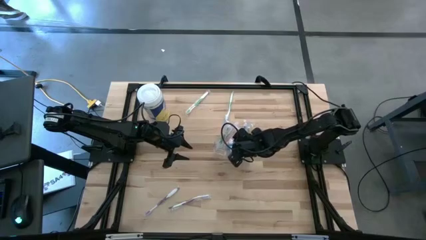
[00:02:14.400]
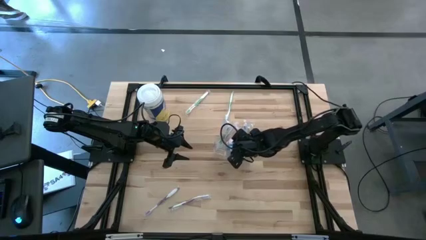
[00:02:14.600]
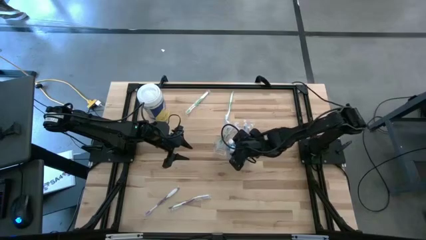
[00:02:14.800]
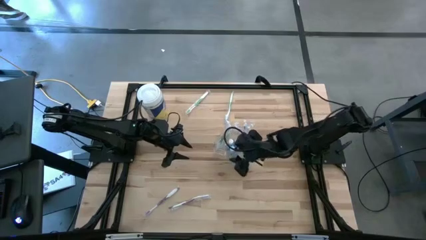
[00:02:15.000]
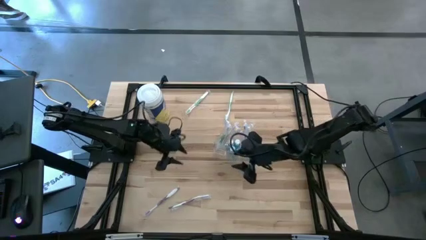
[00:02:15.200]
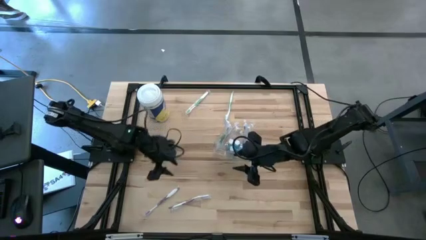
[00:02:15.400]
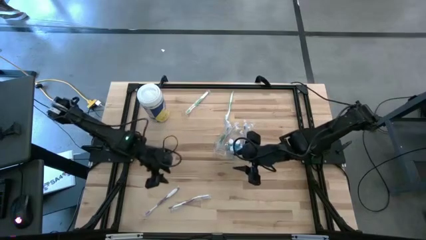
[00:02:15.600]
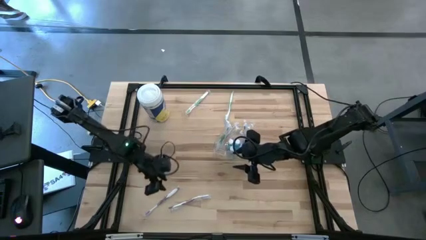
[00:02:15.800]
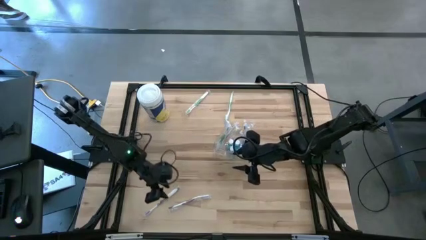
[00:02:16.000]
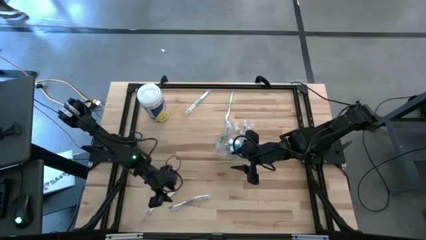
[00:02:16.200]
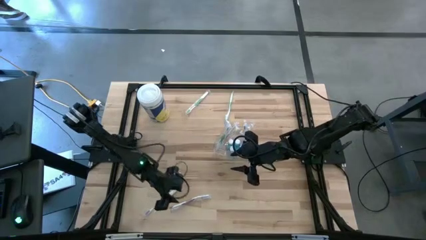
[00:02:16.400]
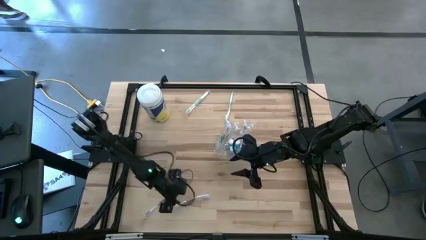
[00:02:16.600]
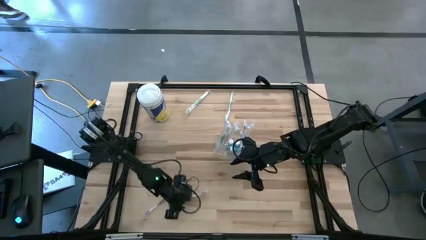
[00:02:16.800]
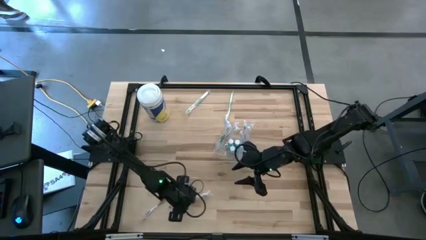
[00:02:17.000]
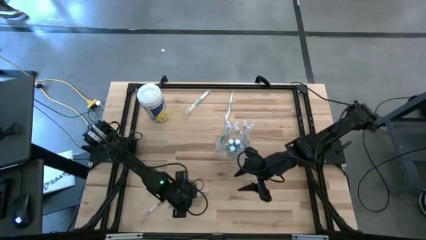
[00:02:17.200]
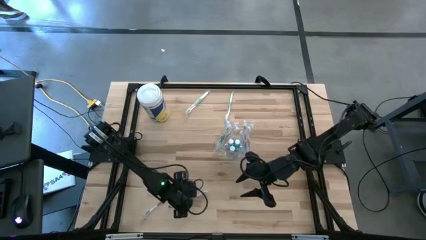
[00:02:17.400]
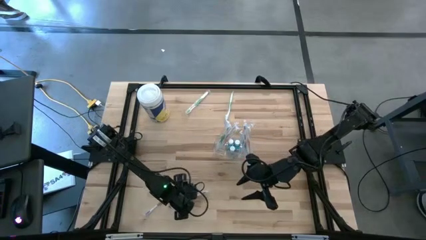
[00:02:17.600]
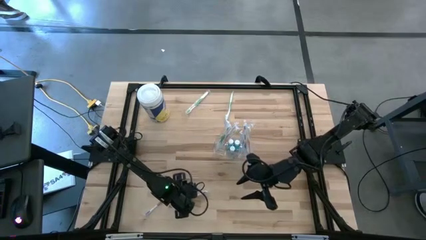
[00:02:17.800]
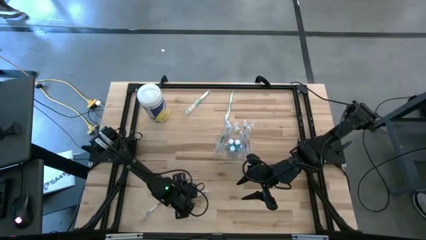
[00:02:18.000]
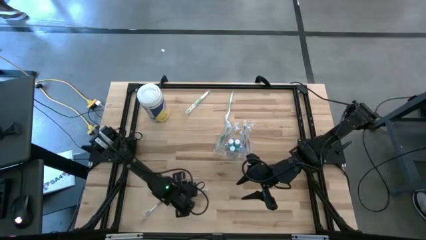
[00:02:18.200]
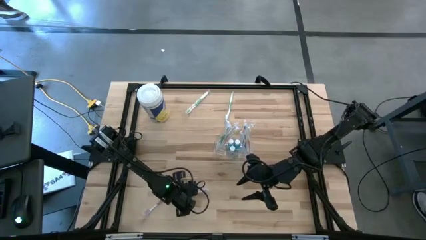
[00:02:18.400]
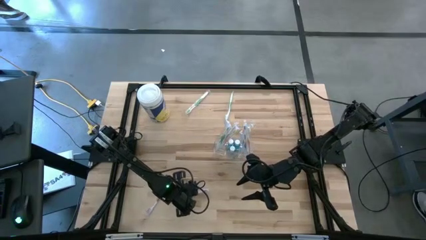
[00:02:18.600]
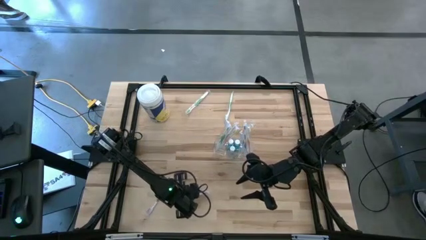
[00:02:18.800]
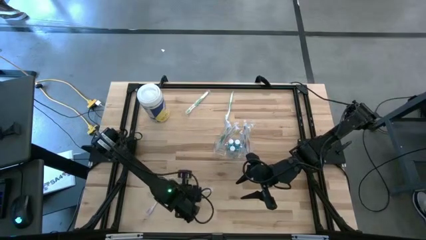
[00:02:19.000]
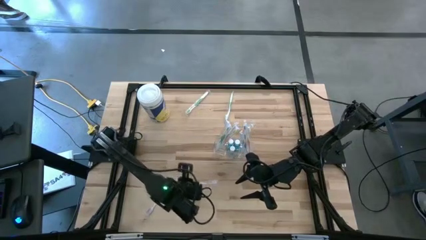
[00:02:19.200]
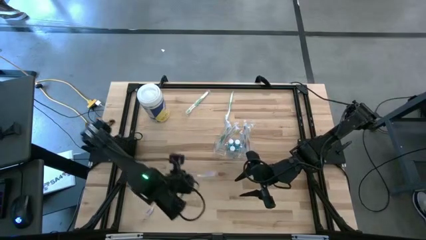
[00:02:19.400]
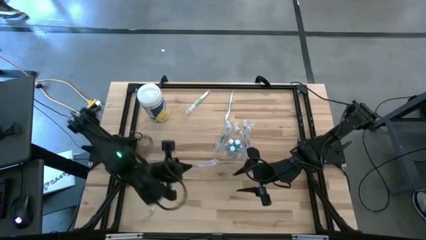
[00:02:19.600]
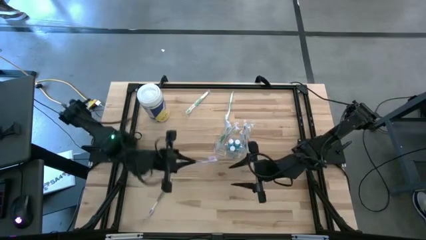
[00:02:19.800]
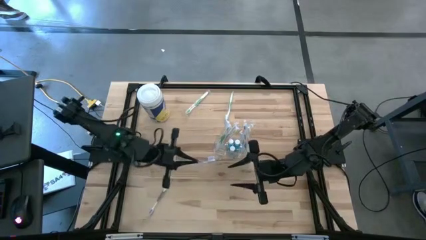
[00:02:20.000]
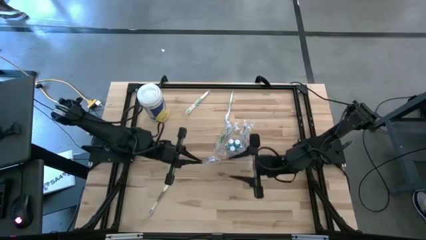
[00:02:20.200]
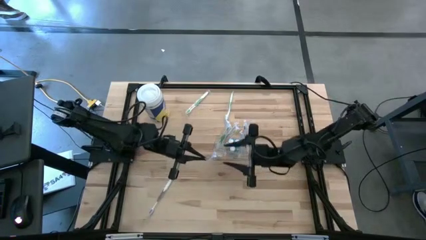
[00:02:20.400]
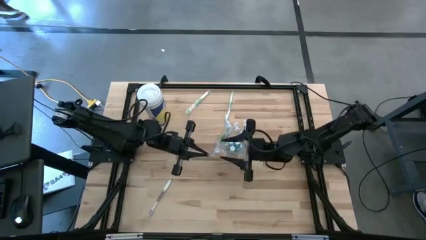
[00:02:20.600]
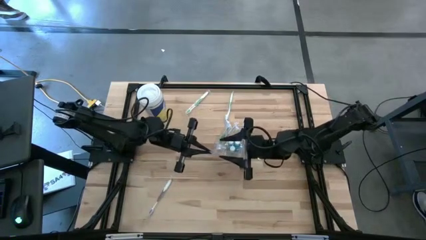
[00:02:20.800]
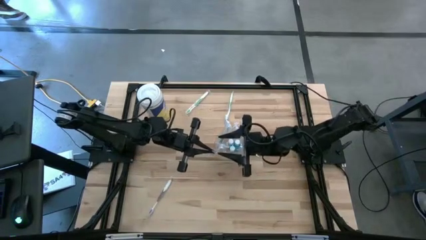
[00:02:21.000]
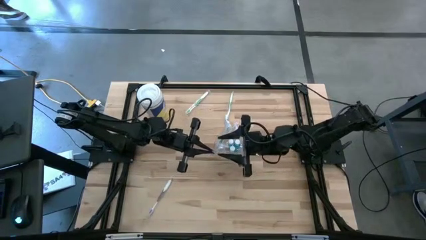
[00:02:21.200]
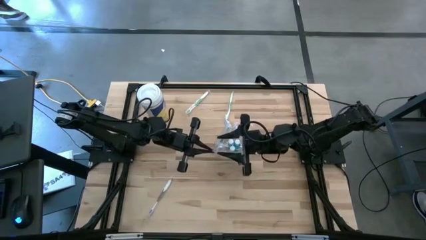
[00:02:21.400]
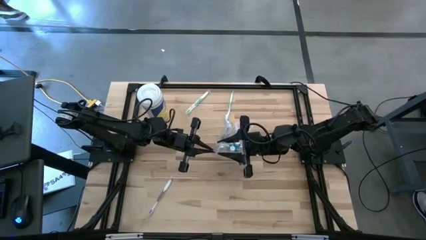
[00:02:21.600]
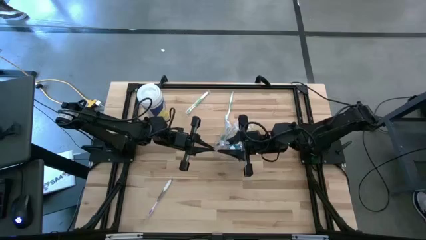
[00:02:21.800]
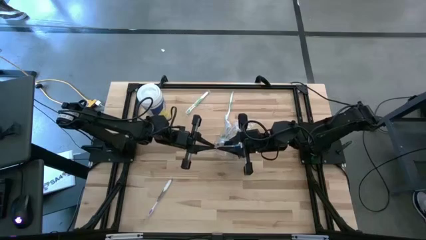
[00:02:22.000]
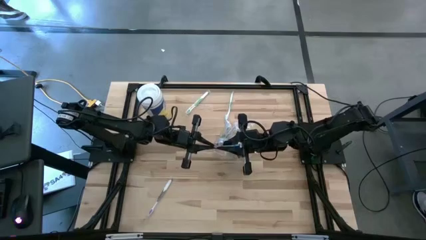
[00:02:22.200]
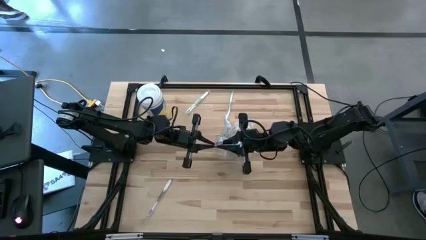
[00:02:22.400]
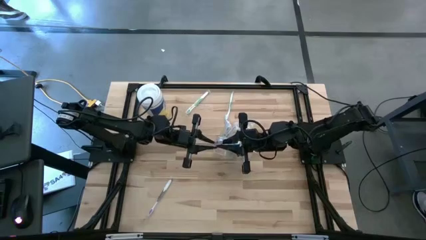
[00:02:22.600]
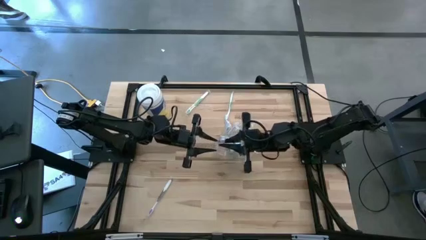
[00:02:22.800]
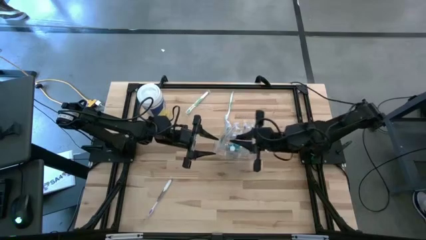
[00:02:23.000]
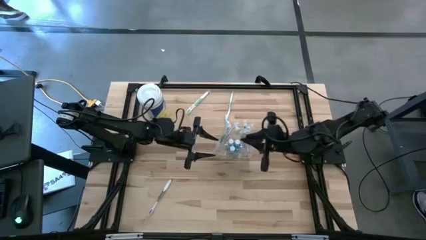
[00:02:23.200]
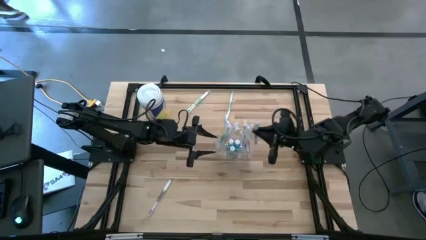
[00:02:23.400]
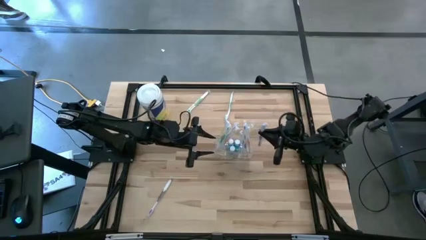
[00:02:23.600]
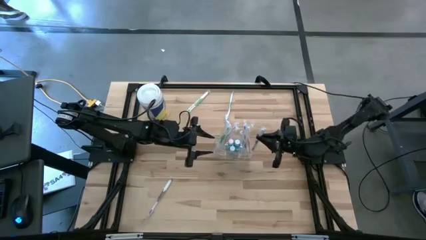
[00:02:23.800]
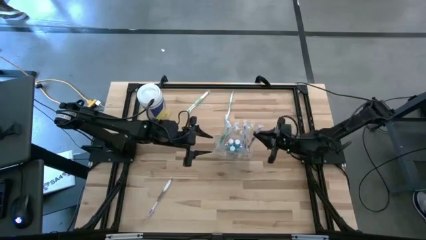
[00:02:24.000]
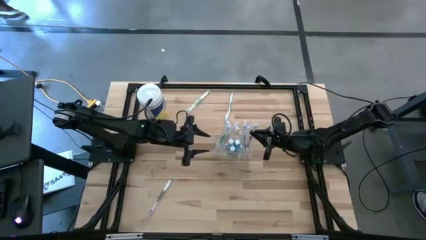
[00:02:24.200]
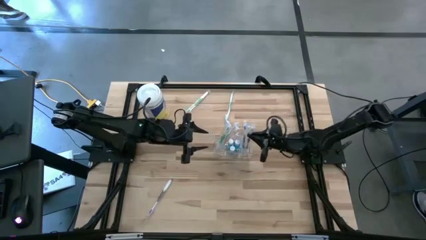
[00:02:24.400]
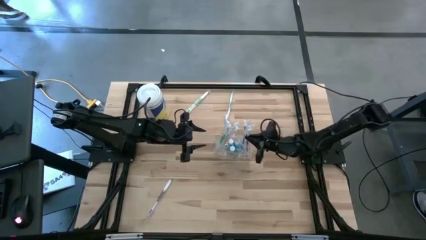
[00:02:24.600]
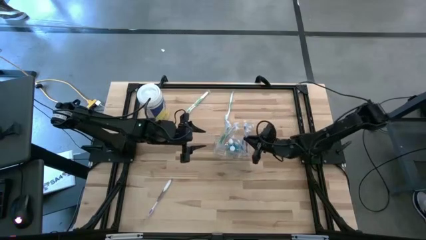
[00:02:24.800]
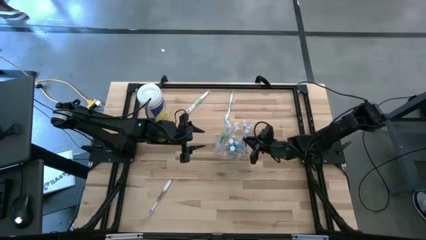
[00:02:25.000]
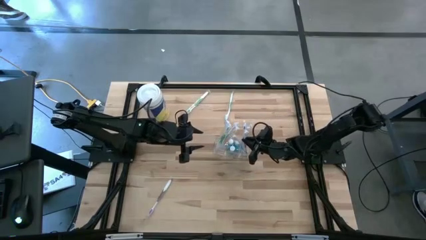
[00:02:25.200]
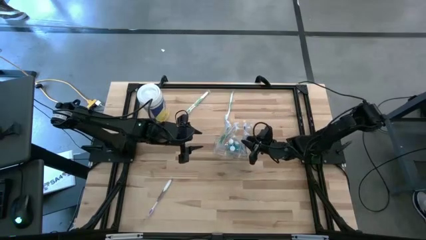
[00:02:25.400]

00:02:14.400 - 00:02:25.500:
Task: Pick & Place toothbrushing station
Put the right violet toothbrush into the right section of the transparent organizer
